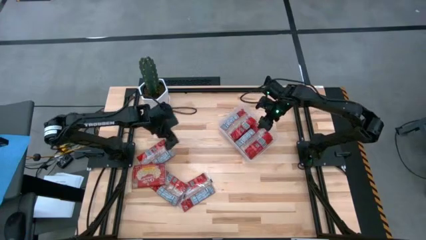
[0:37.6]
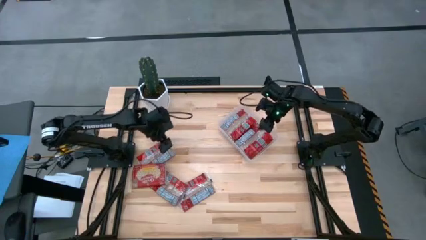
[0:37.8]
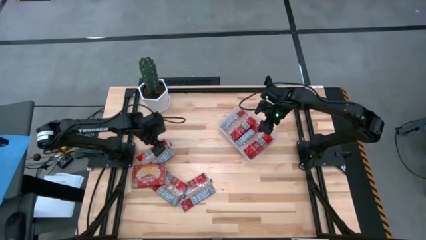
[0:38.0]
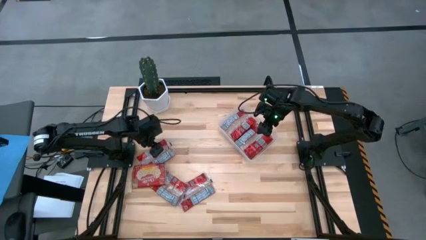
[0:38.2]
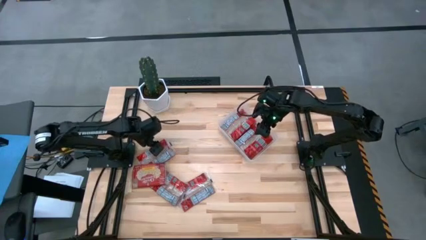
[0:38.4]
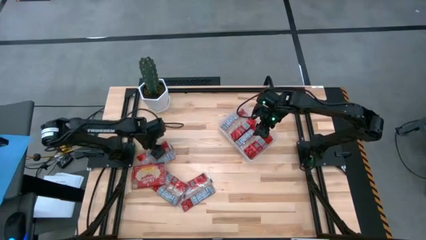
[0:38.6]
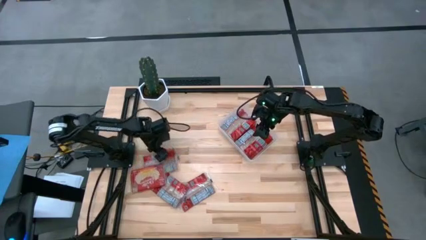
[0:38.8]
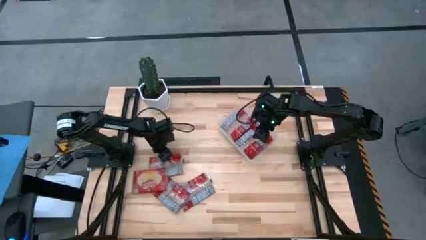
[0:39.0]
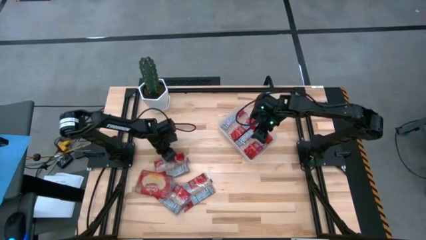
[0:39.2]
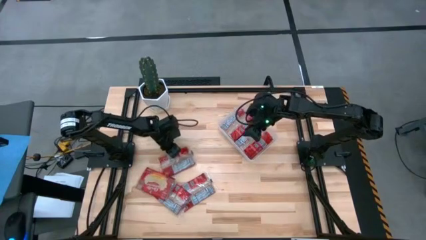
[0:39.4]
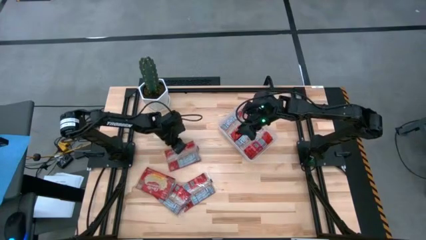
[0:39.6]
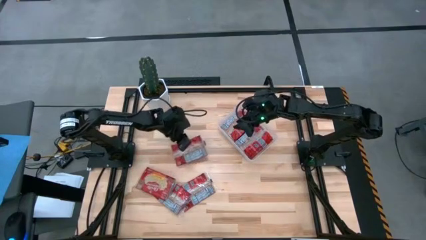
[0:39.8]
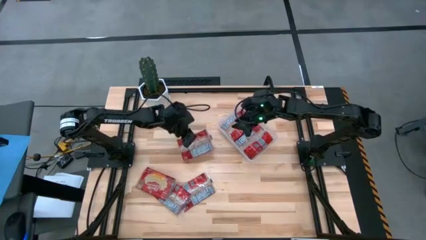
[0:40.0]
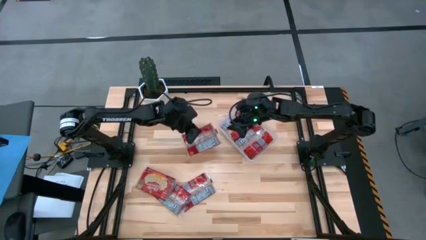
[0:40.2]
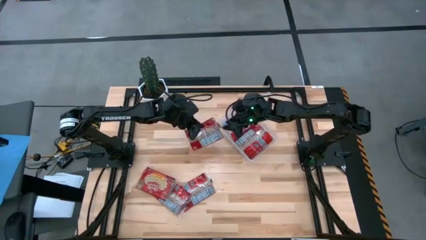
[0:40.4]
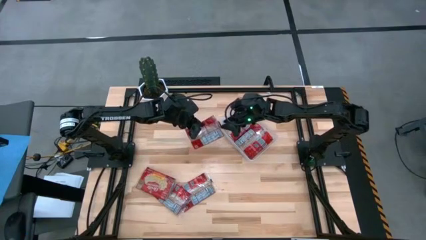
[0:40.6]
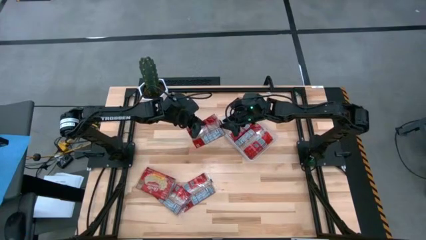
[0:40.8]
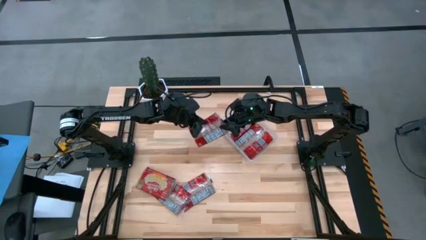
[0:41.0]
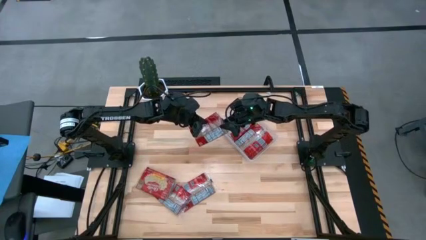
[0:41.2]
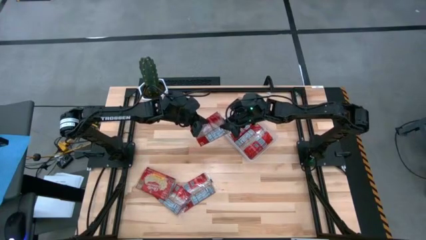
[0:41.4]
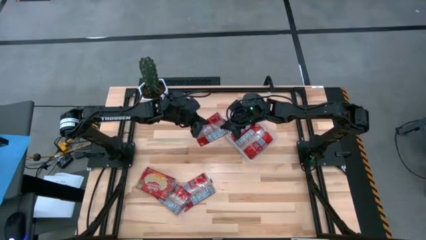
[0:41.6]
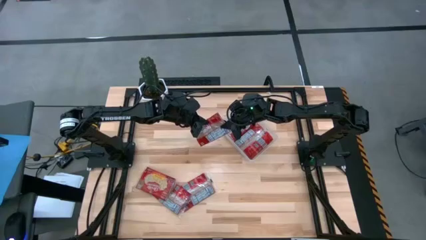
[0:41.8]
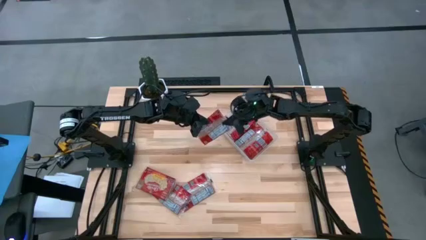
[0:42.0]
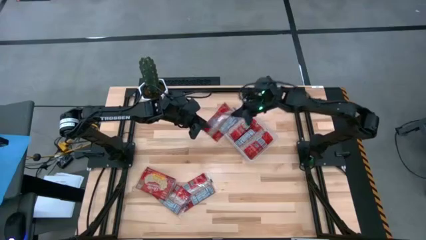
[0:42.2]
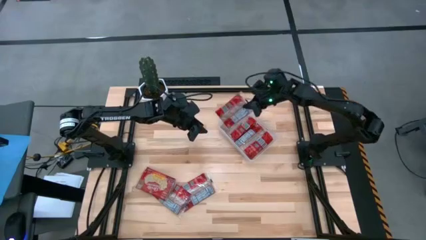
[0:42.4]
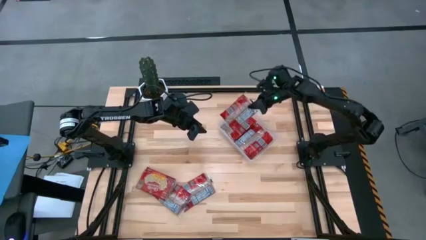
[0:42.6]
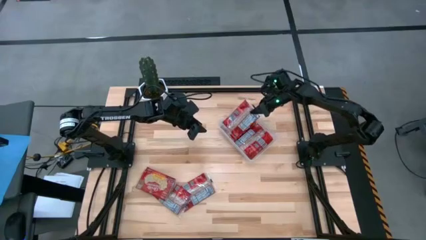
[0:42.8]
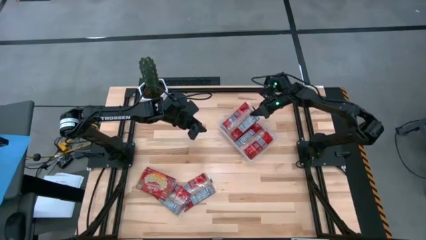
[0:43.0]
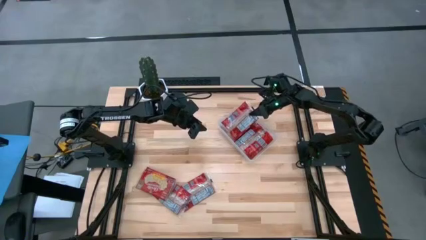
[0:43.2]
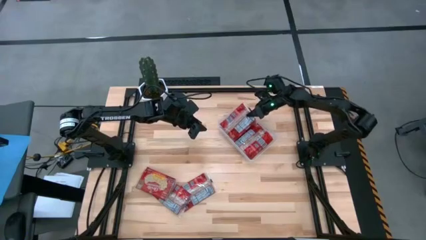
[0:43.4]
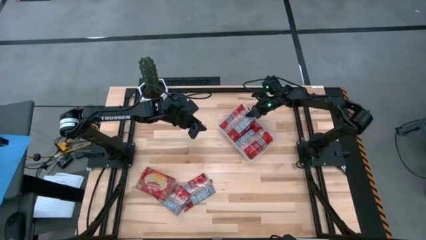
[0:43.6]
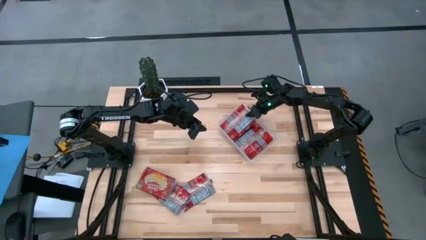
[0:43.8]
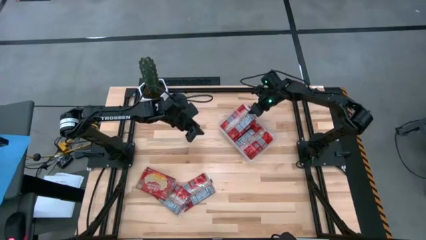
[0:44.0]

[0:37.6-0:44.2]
Task: Sort popcorn bags into baskets
Put the red popcorn bag into the transparent bin

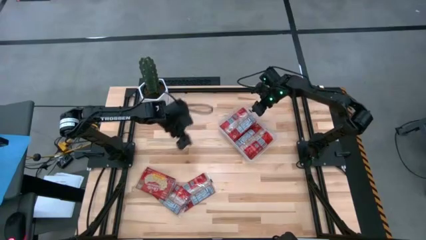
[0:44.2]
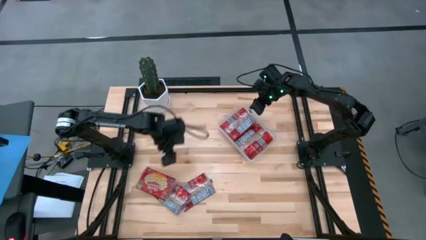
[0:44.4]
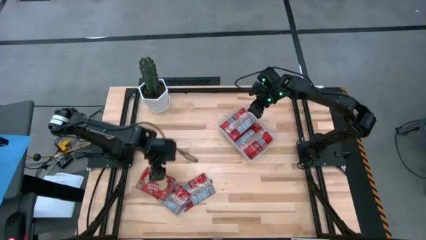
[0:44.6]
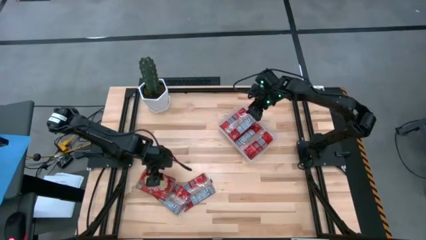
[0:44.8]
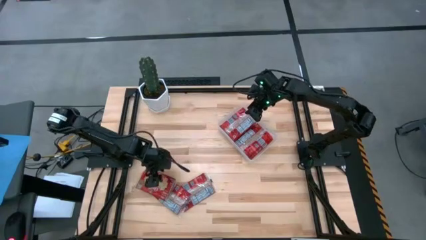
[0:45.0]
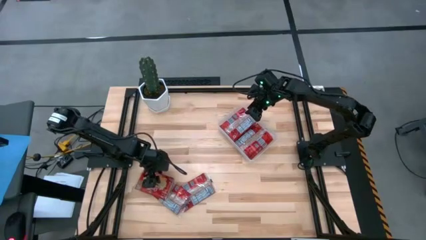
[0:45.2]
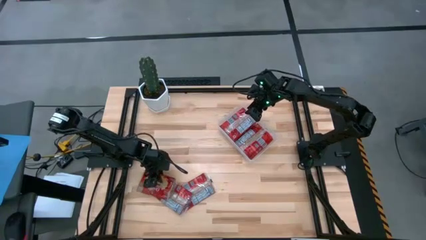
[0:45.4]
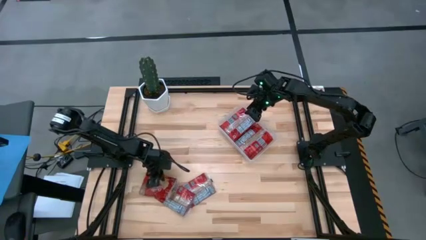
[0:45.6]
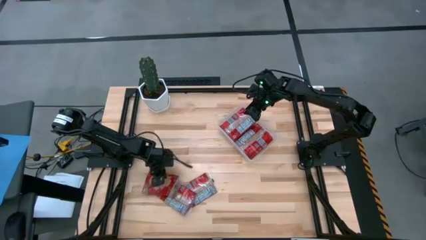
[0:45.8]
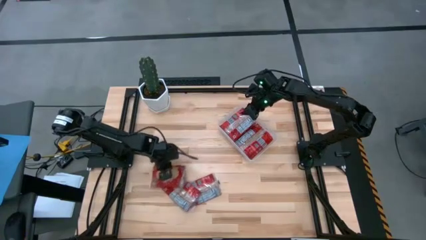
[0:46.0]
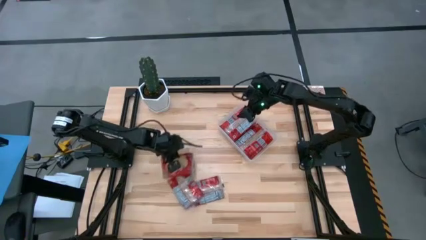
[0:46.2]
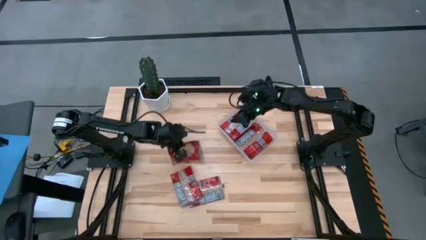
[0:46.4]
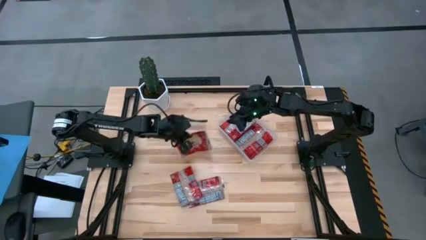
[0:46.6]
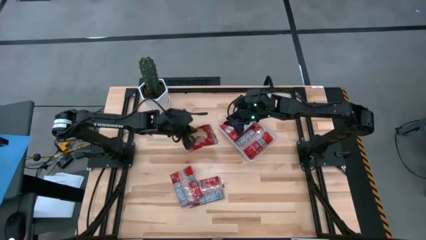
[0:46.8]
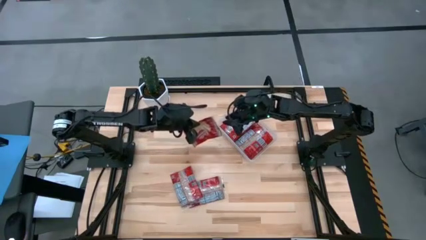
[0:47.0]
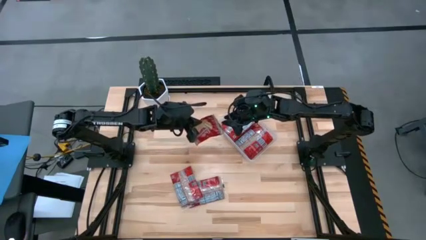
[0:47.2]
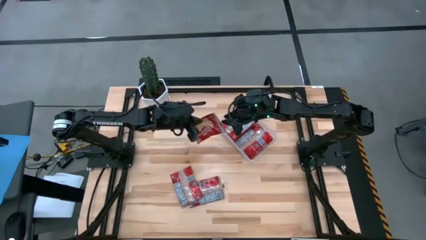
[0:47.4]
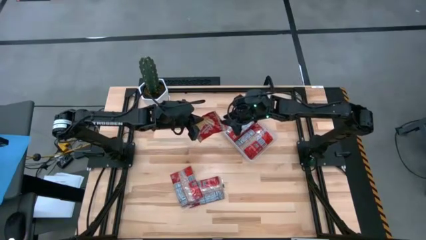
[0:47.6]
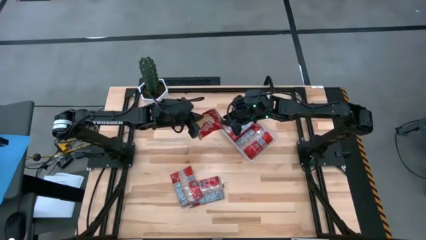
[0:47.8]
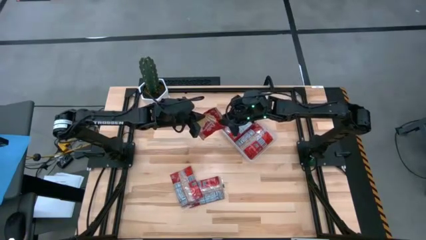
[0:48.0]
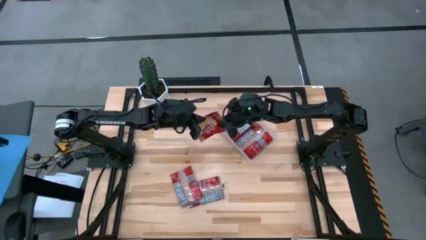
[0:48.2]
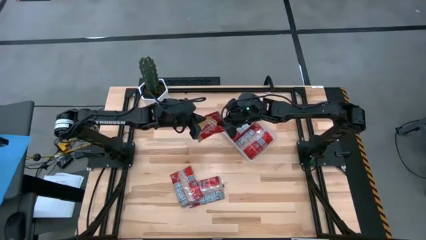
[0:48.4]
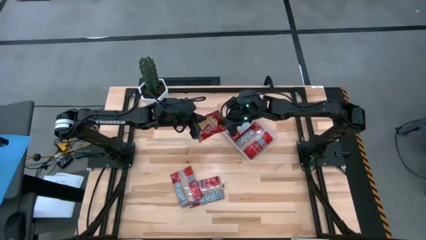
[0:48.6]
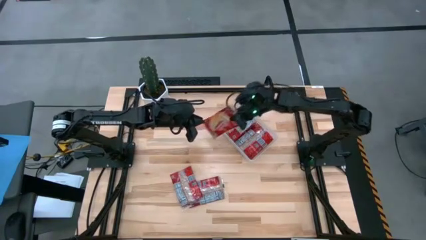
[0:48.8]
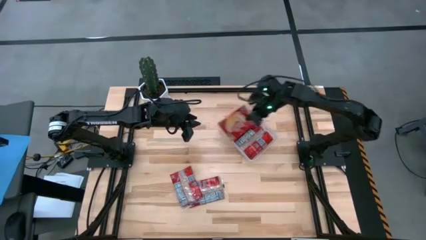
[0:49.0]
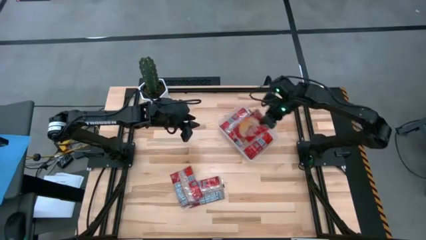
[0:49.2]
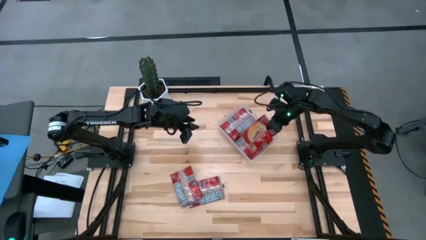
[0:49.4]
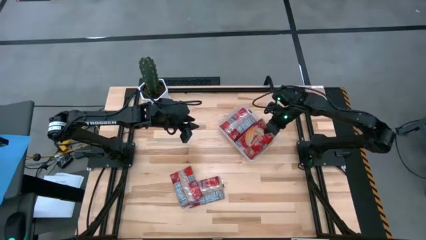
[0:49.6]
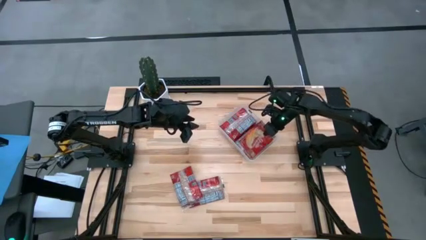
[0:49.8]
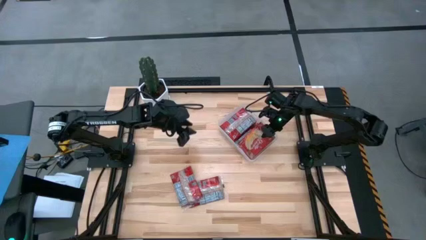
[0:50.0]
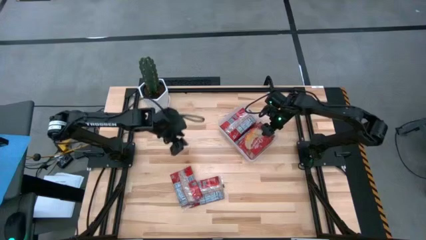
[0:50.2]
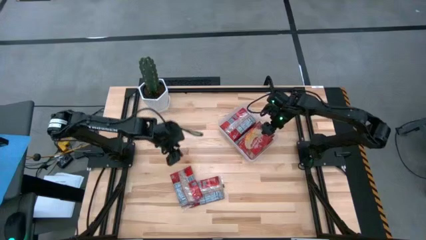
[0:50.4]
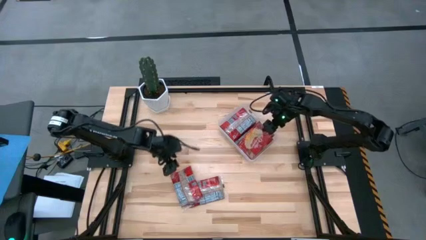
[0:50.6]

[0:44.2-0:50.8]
Put the red popcorn bag into the transparent bin

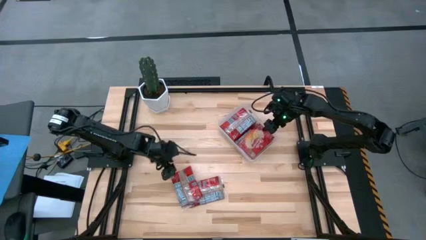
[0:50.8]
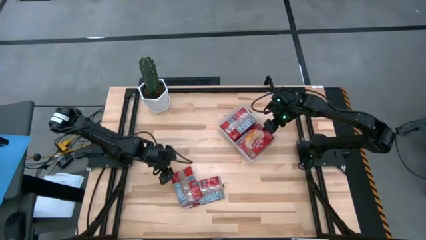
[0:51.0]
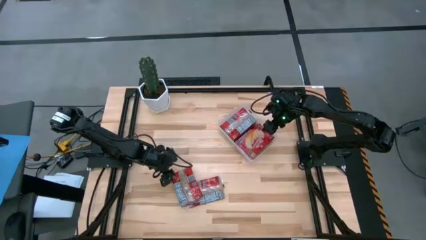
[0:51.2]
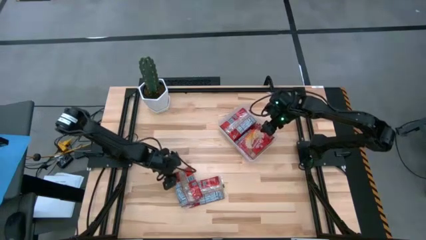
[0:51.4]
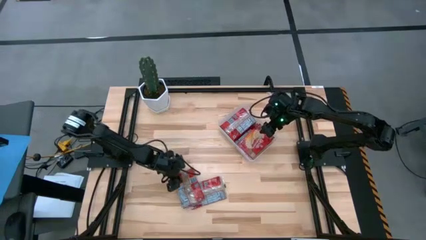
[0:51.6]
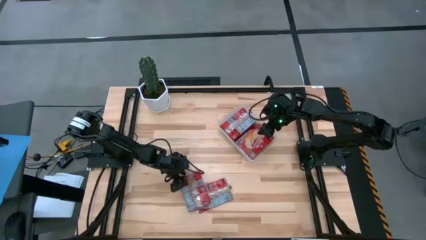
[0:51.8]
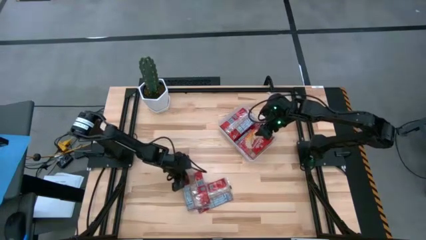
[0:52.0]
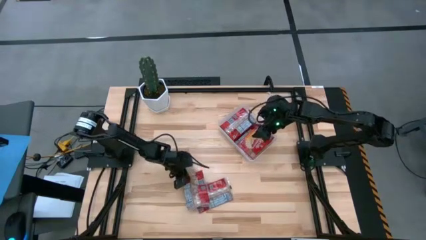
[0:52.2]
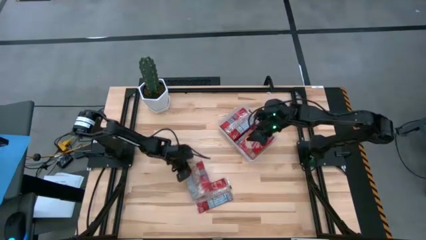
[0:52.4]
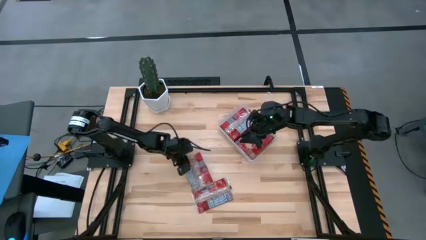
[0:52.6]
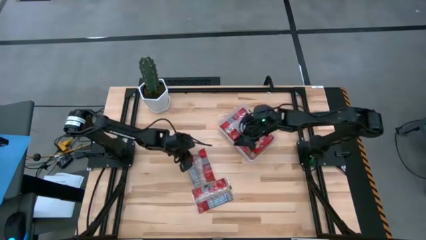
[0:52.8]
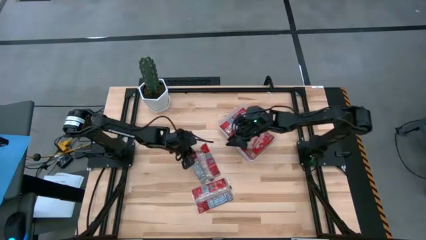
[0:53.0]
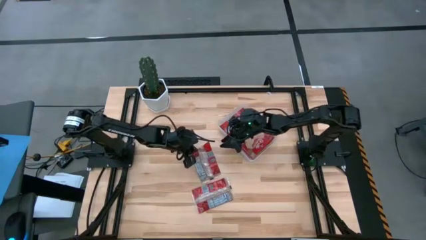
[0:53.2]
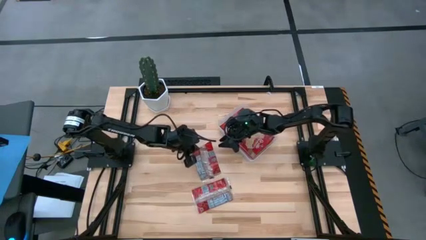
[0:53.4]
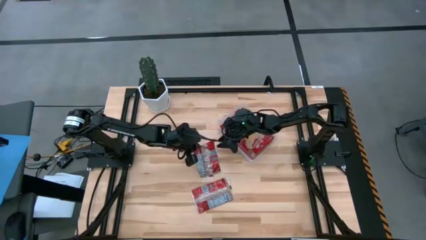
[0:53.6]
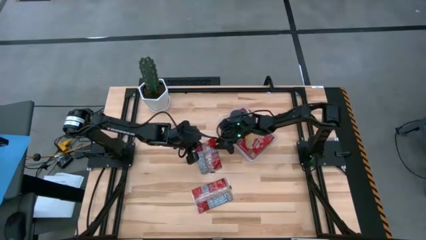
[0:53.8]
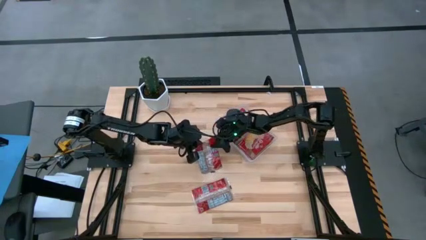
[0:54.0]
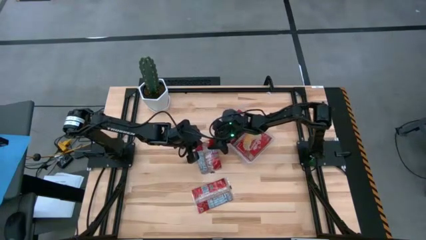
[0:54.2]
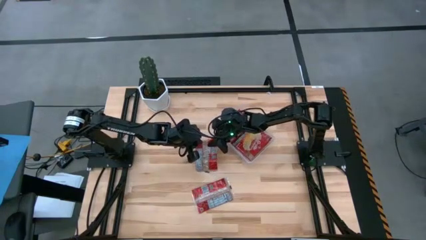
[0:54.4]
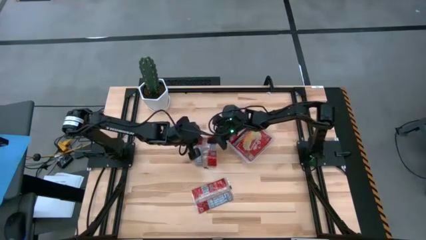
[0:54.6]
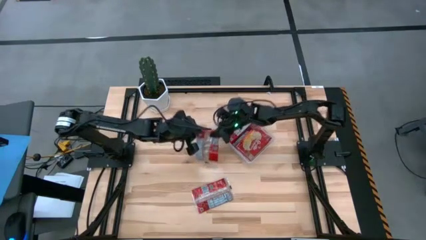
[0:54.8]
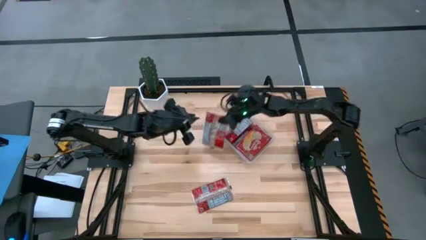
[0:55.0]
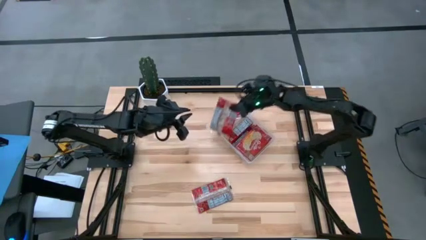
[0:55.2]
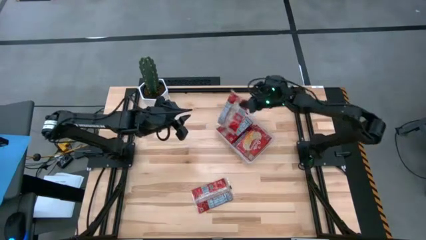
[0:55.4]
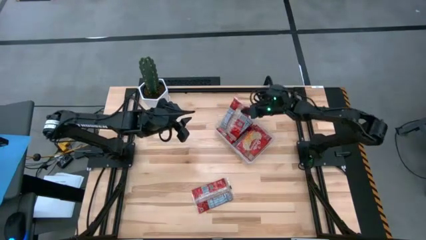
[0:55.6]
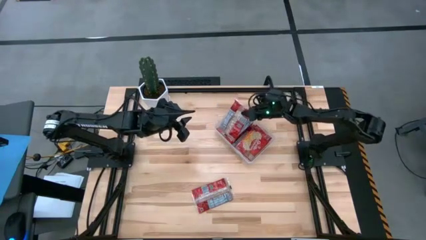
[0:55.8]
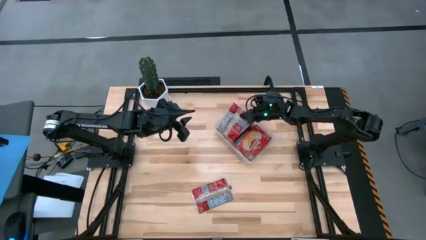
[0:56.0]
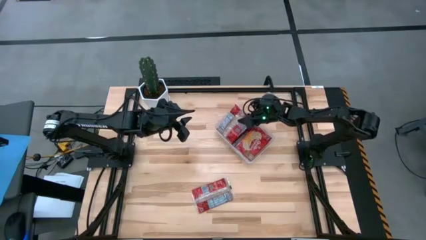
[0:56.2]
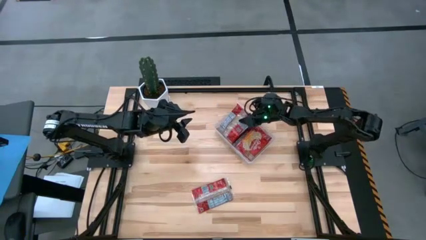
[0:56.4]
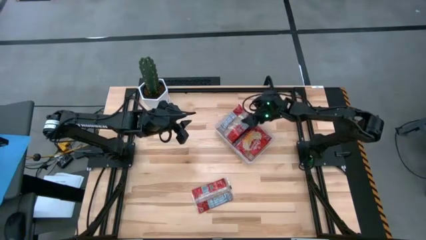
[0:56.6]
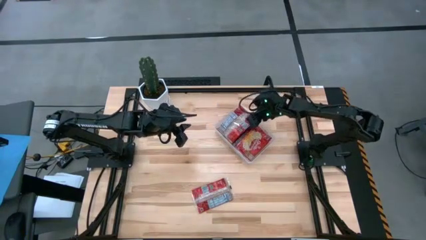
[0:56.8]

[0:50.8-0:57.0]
Put the red popcorn bag into the transparent bin
